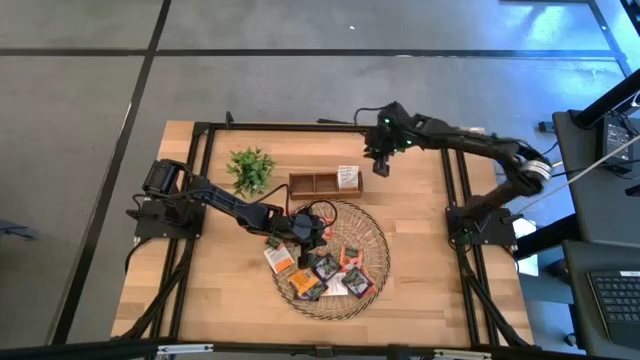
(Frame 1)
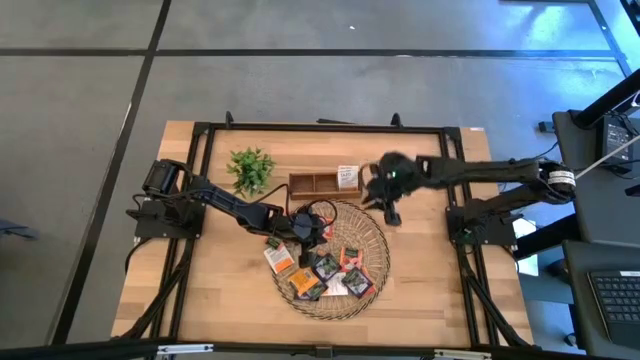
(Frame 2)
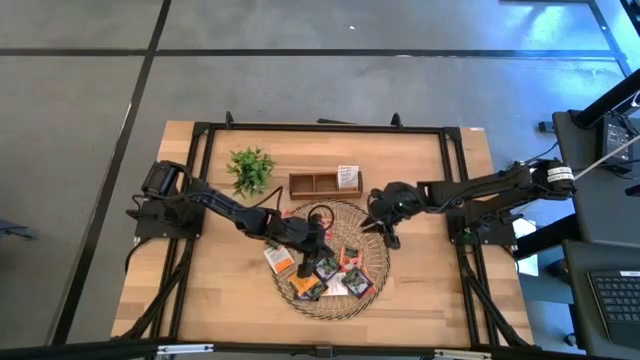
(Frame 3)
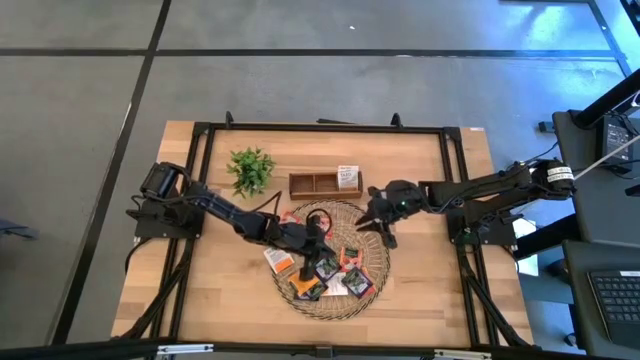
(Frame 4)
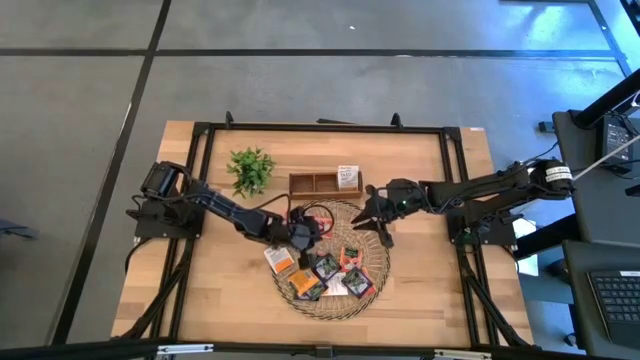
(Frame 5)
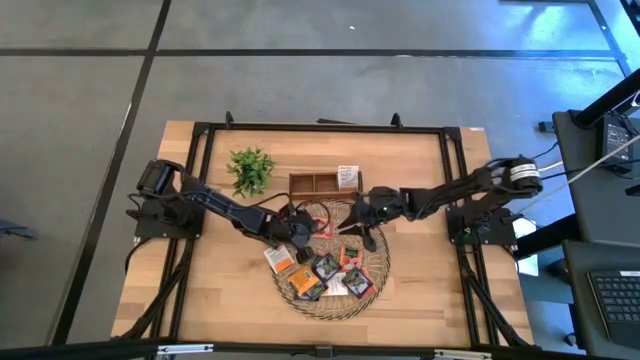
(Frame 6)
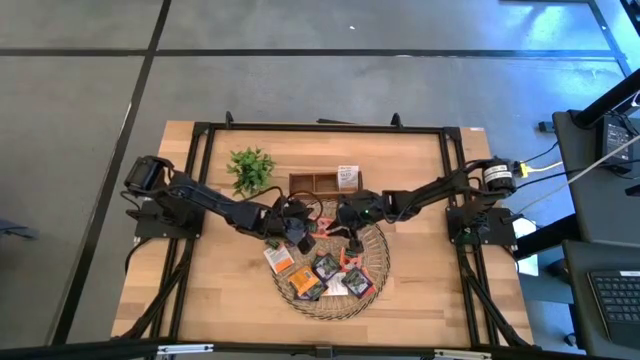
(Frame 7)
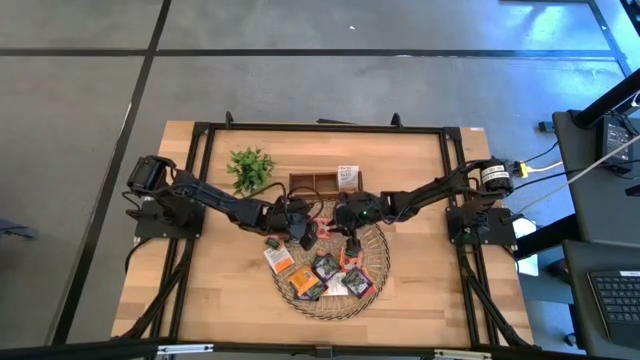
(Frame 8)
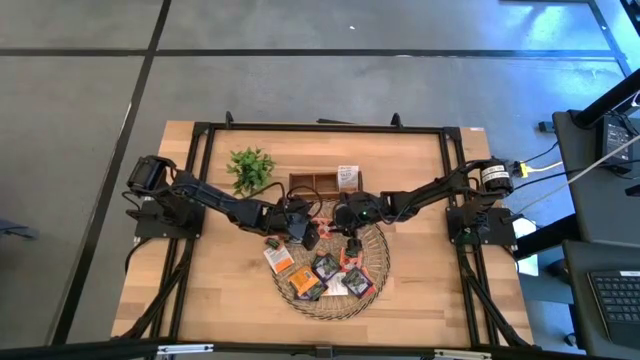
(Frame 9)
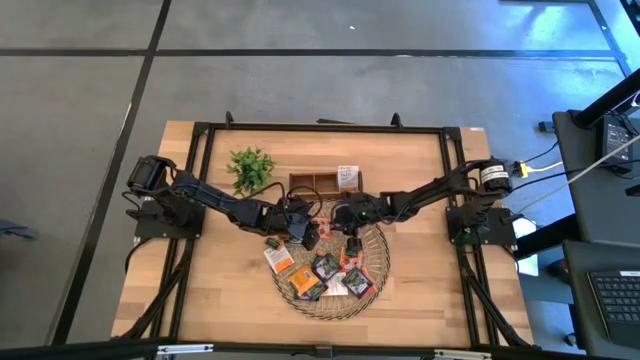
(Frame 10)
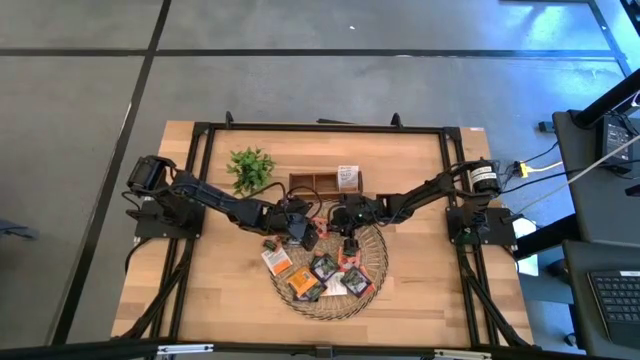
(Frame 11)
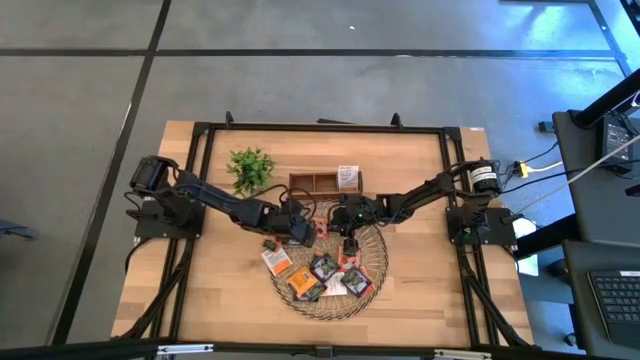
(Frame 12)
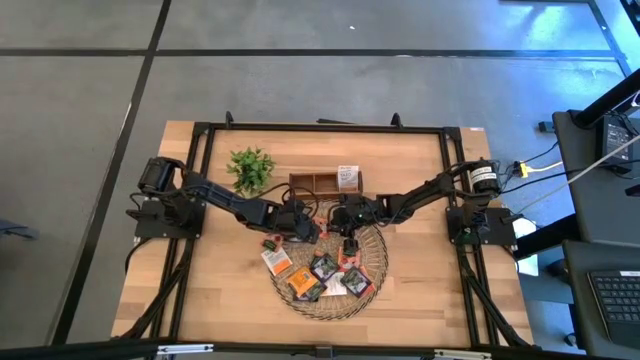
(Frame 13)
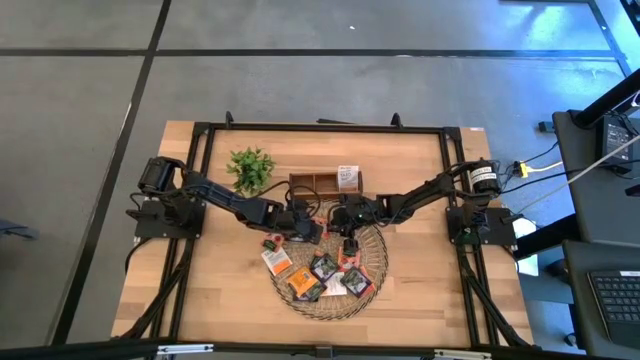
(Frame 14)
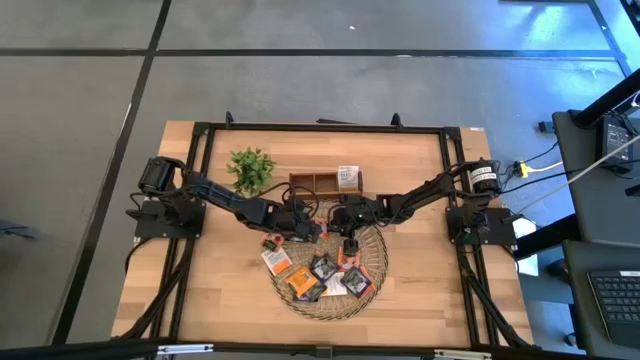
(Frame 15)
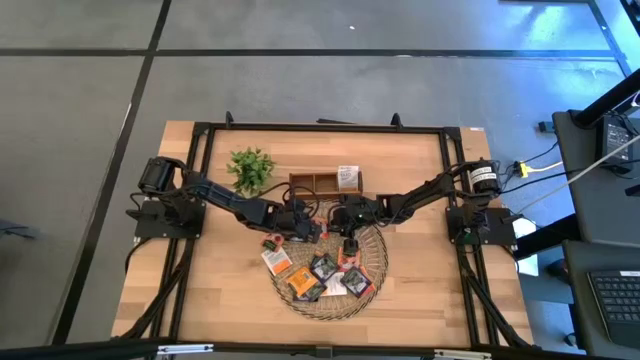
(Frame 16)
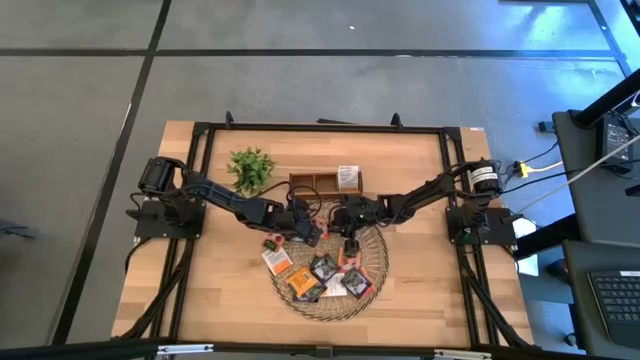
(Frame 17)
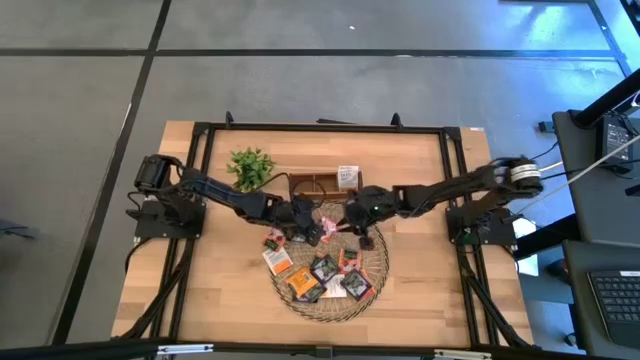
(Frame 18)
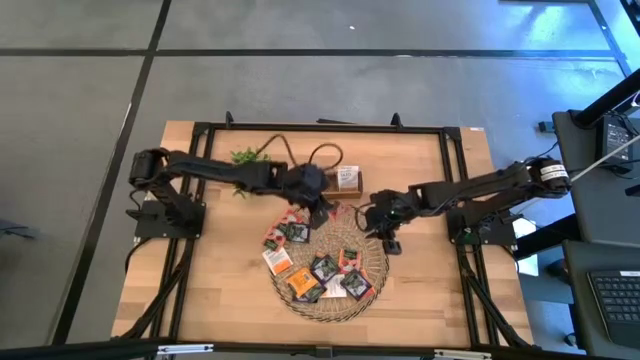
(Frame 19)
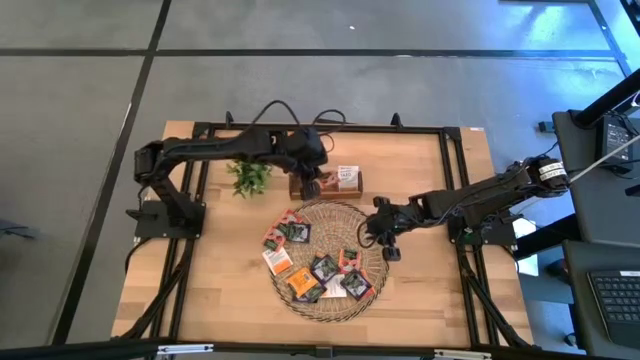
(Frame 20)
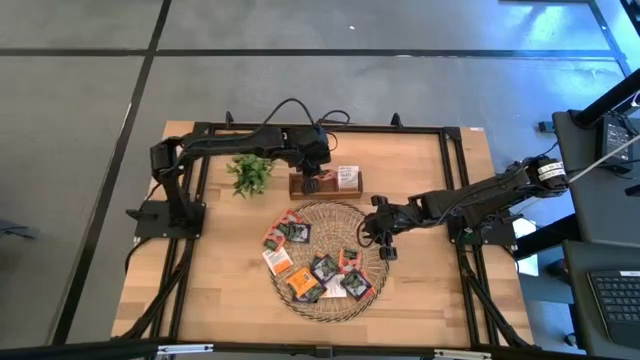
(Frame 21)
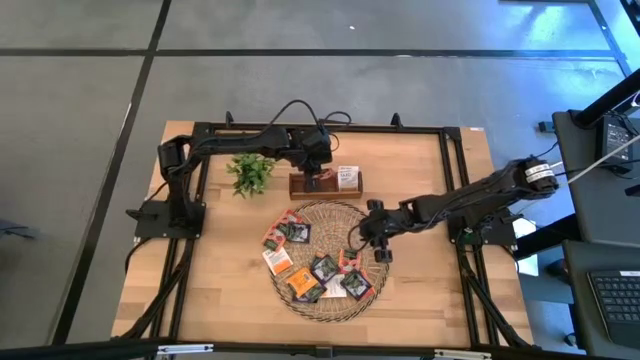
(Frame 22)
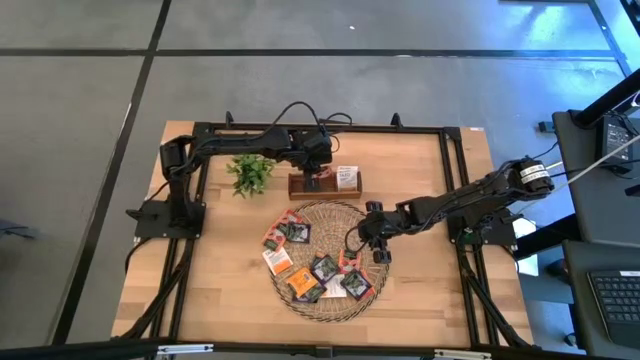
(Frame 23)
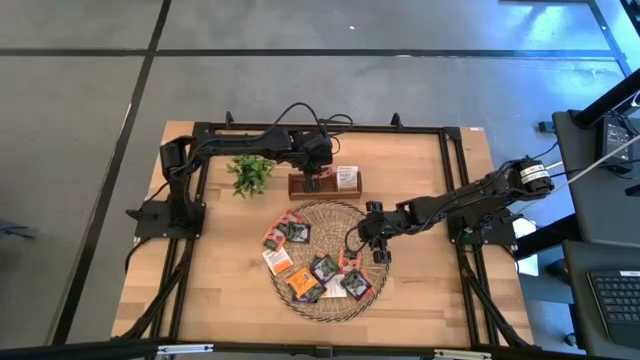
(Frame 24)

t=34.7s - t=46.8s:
Task: Pick & Place Tea
Put the orange and black tea bag into the middle section of the wooden organizer

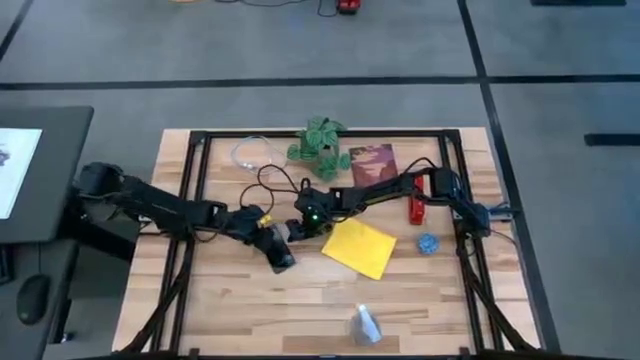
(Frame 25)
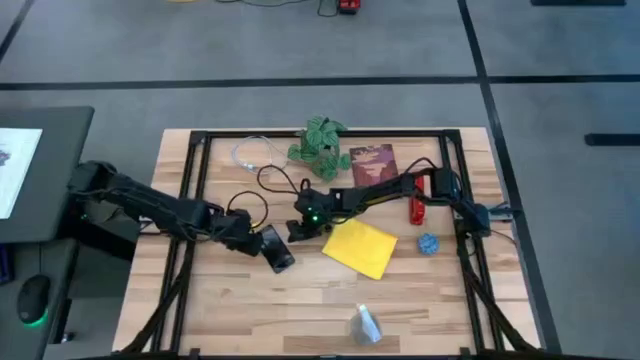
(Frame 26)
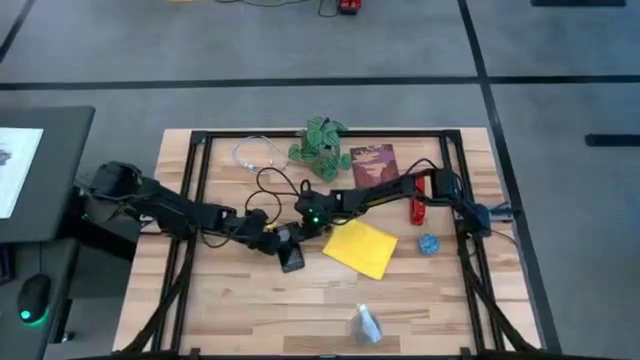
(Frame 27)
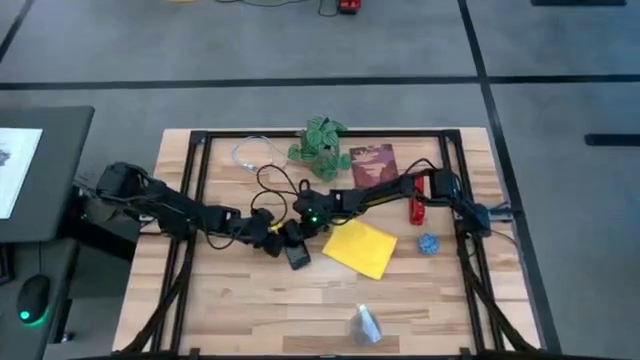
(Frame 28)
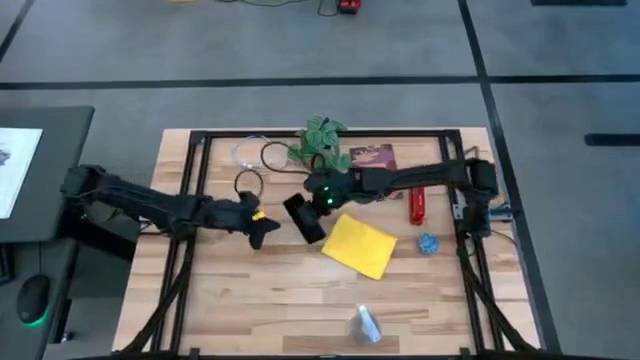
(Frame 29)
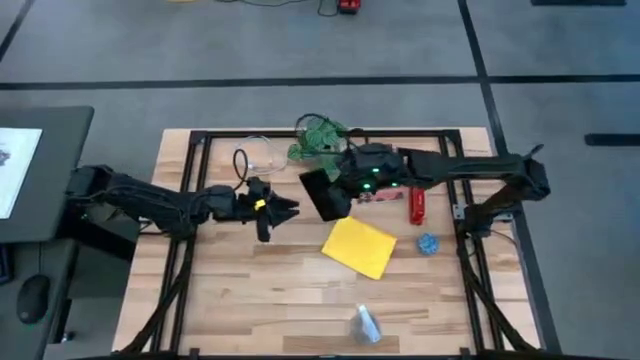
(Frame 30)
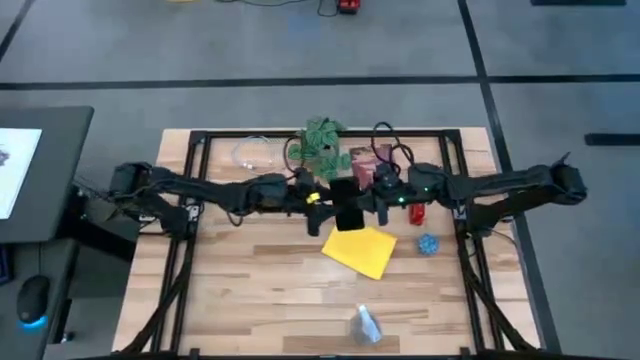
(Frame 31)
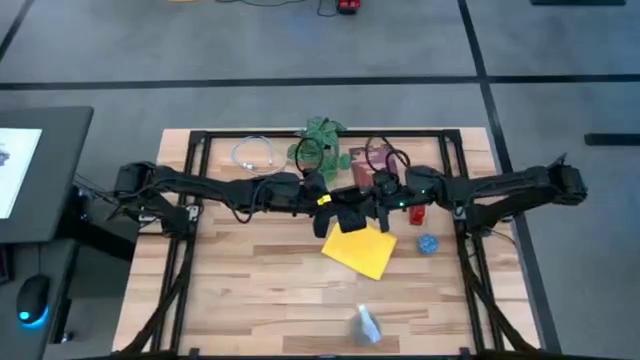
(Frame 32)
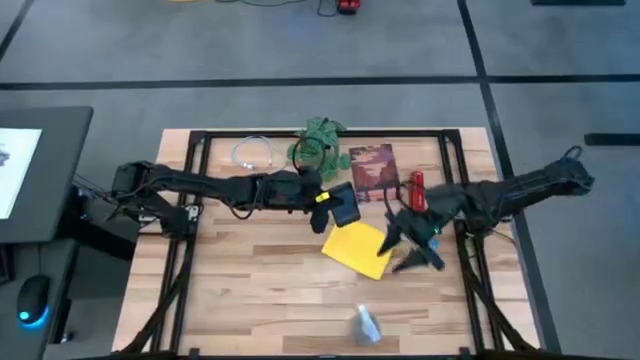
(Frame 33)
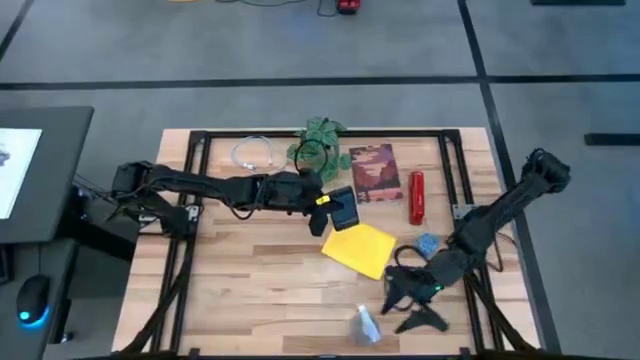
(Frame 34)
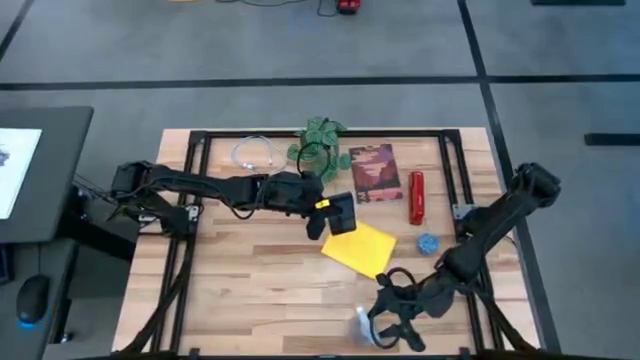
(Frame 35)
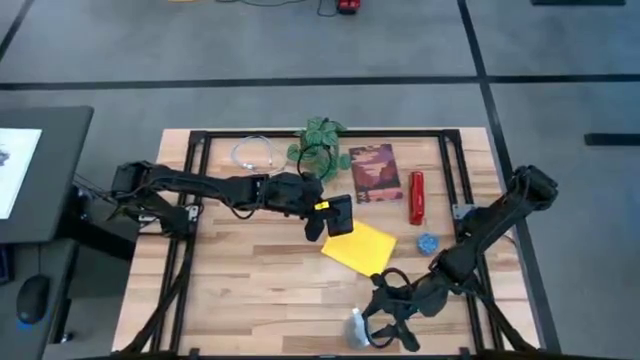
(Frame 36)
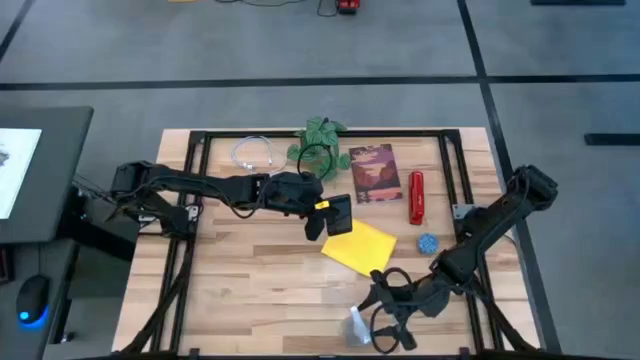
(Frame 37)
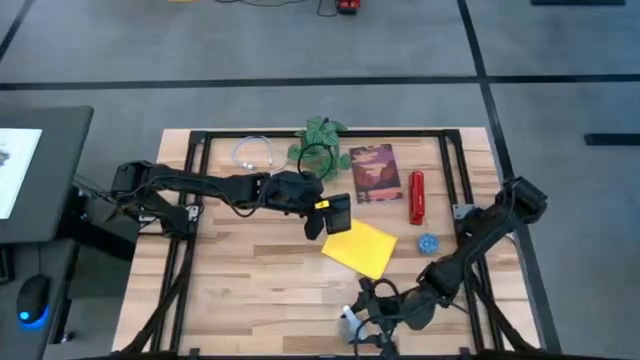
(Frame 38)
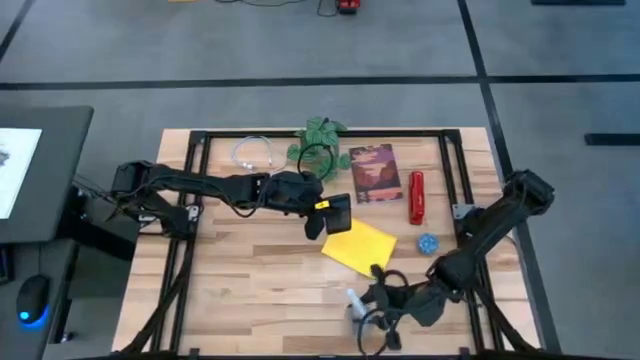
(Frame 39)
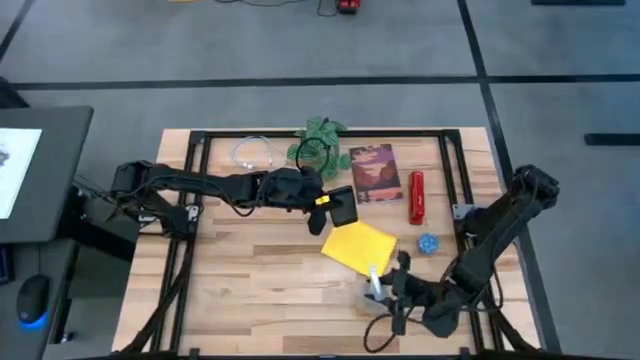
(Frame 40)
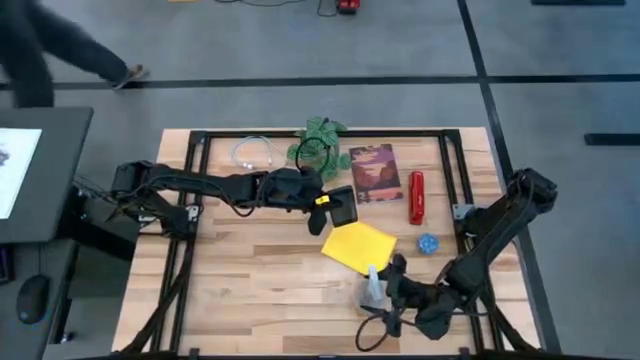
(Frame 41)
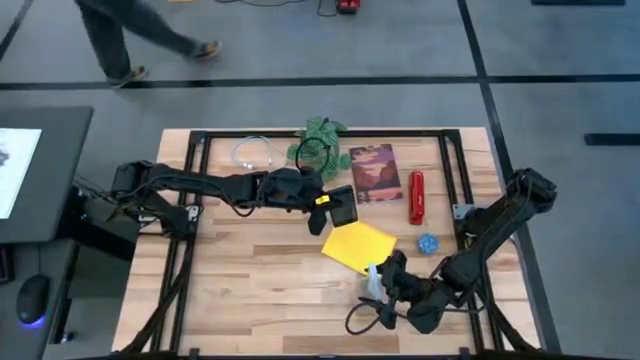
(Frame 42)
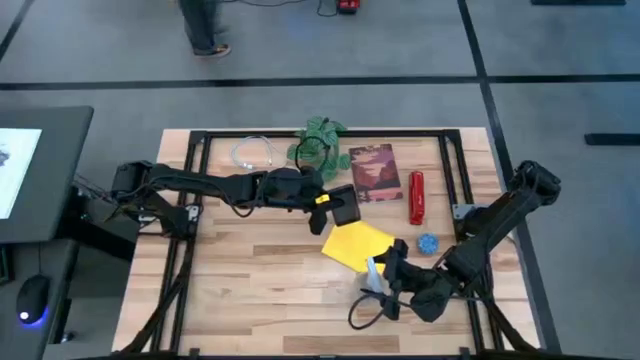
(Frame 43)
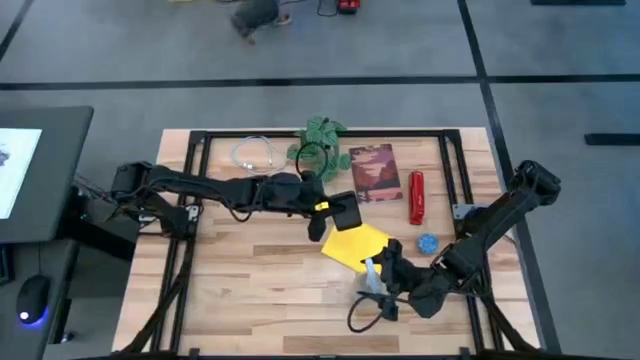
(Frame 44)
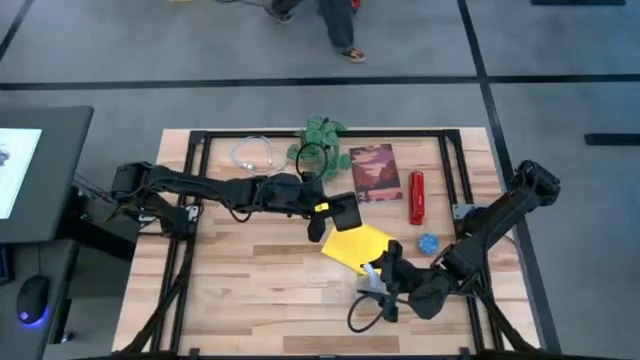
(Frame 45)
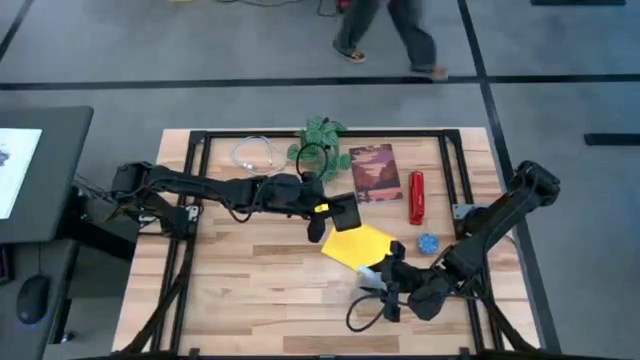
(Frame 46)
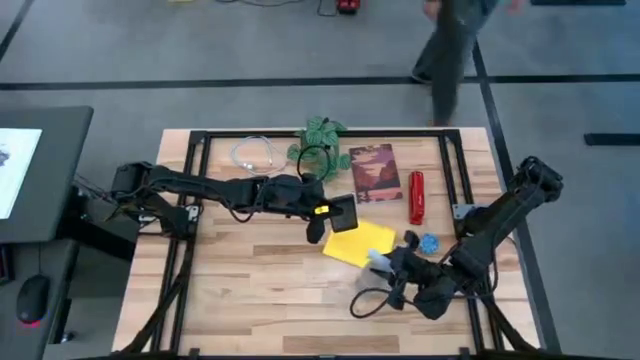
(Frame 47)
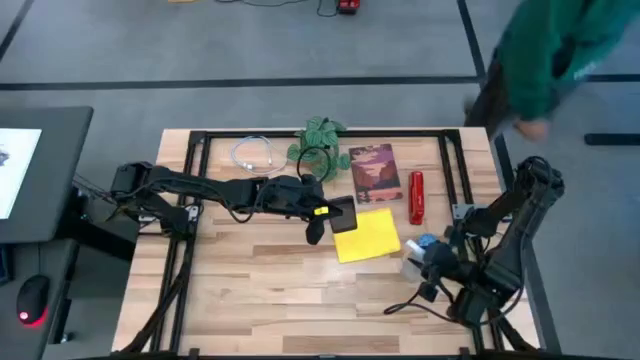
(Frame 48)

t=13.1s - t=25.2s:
Task: Apply microfiber cloth
Spray the front of the cellphone with the spray cleaning bottle
